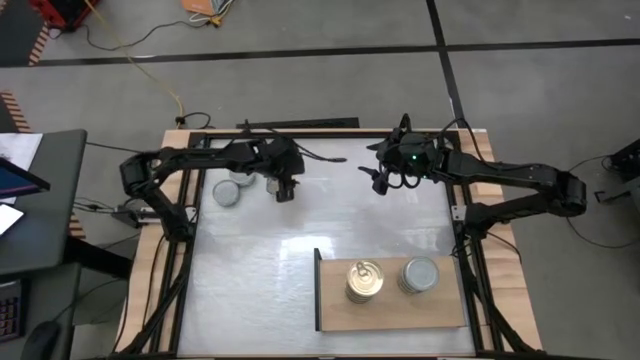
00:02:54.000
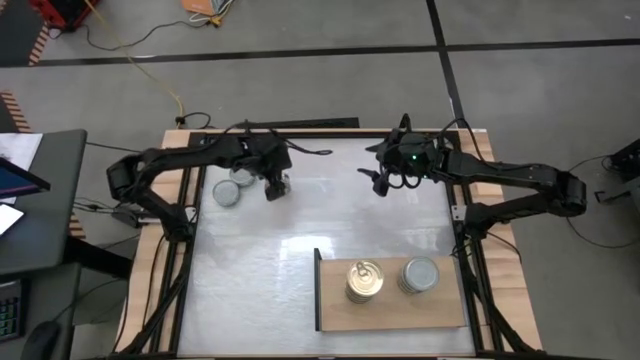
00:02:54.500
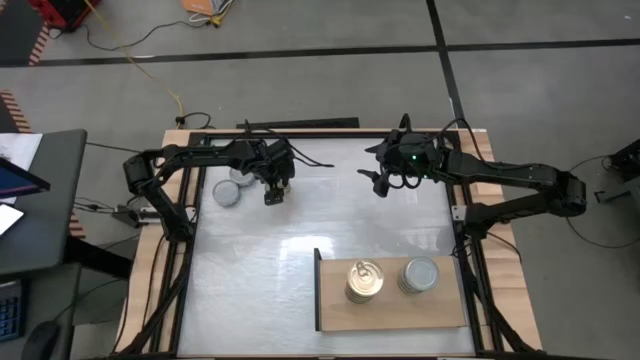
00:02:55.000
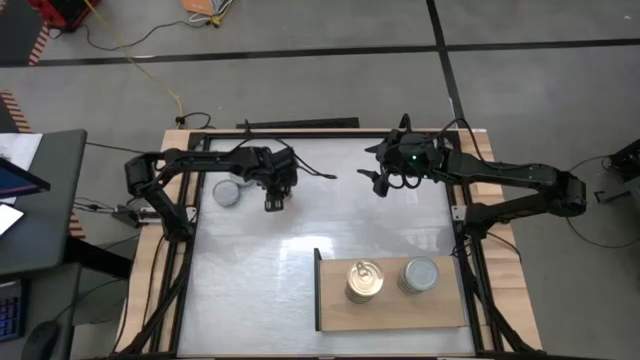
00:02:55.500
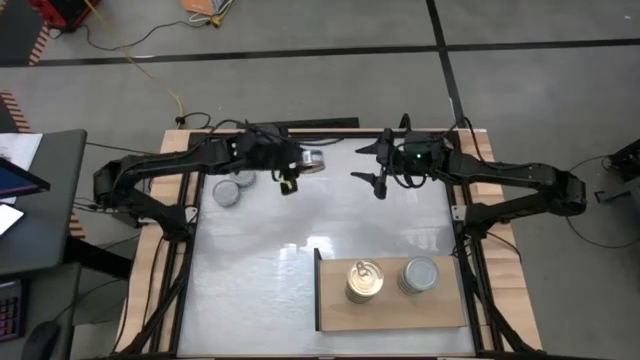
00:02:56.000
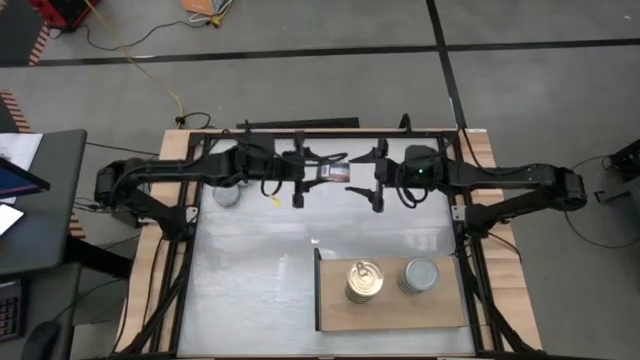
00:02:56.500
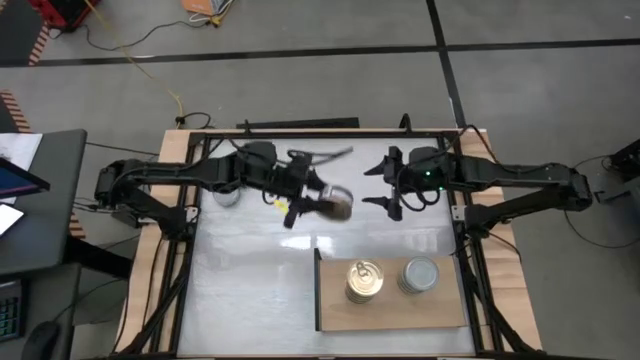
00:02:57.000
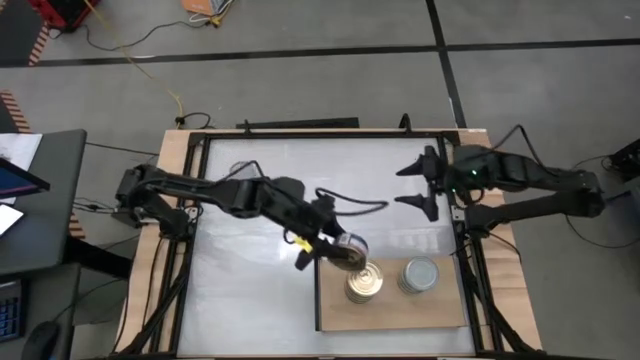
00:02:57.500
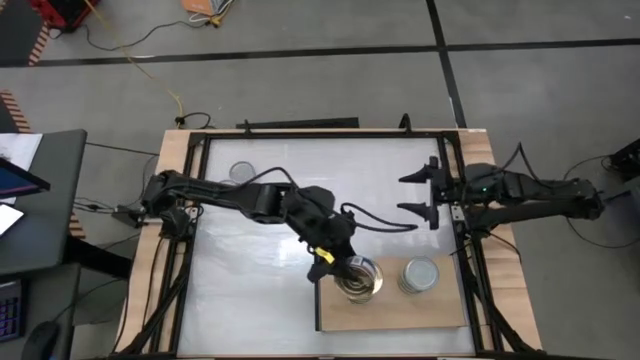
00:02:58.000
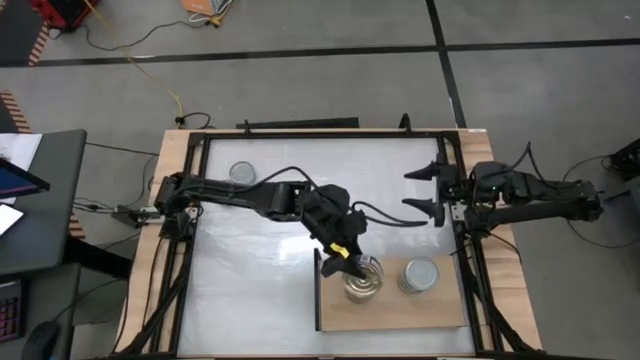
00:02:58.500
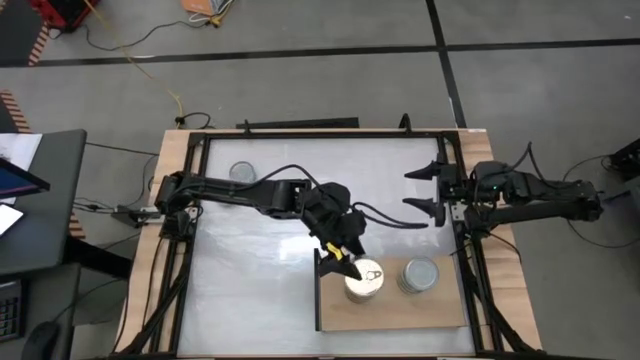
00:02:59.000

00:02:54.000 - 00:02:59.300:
Task: Stack canned seafood by type on shelf
Stack the blue pink tuna can on top of the blue pink tuna can on the shelf

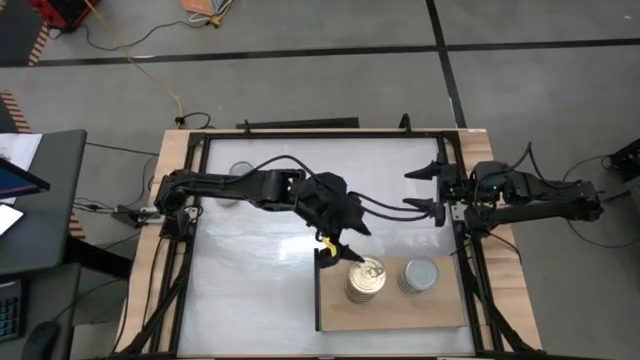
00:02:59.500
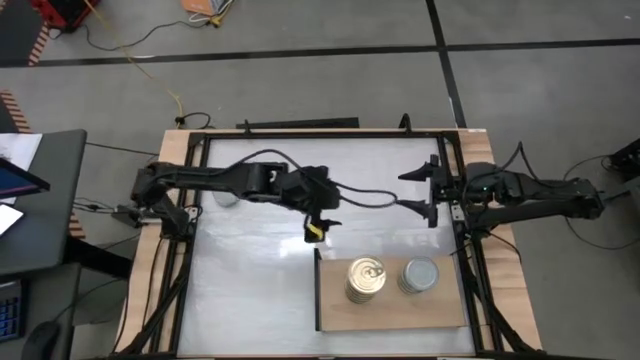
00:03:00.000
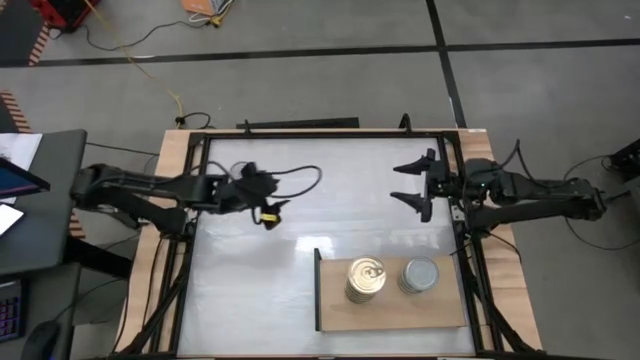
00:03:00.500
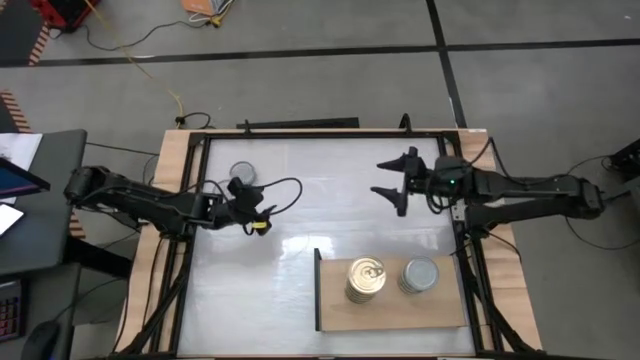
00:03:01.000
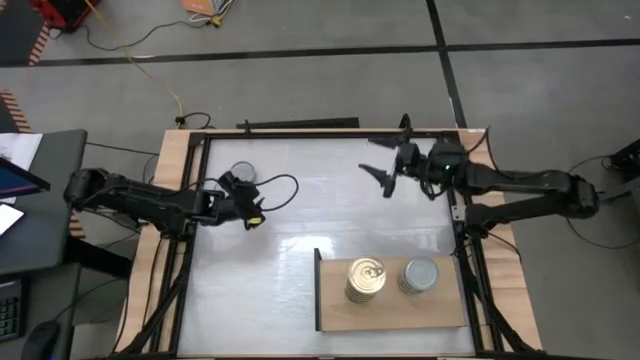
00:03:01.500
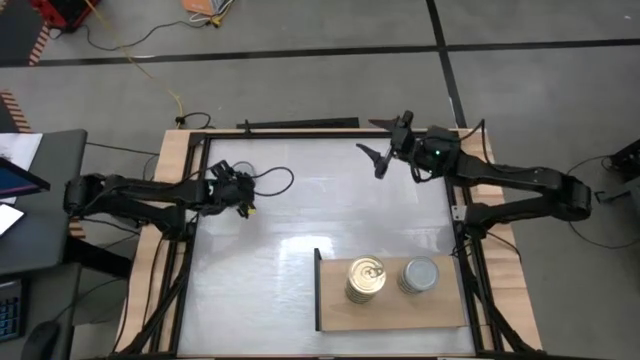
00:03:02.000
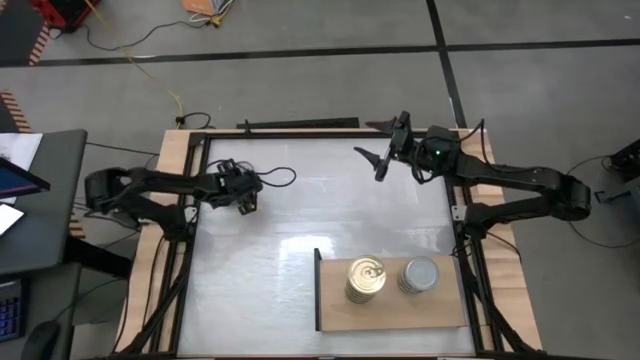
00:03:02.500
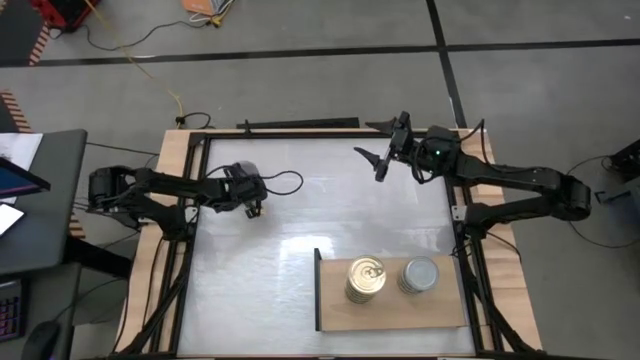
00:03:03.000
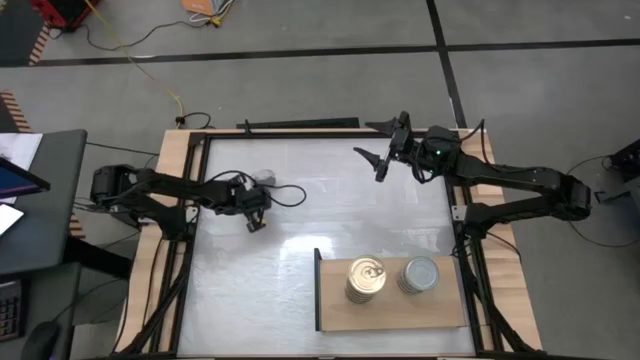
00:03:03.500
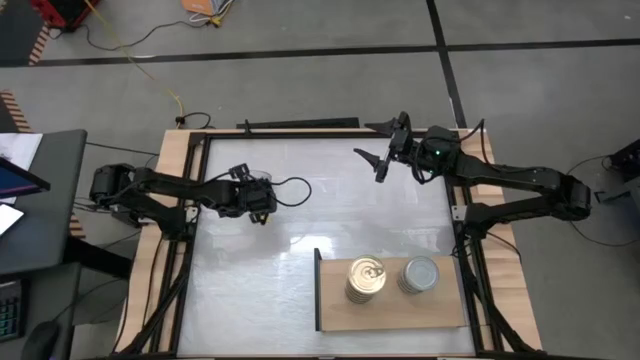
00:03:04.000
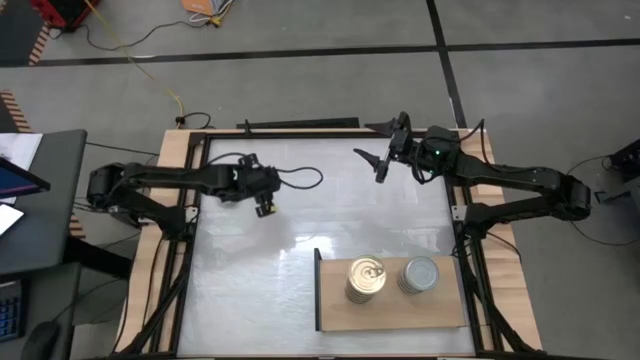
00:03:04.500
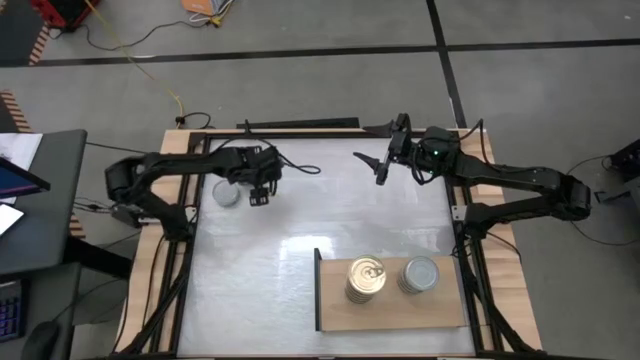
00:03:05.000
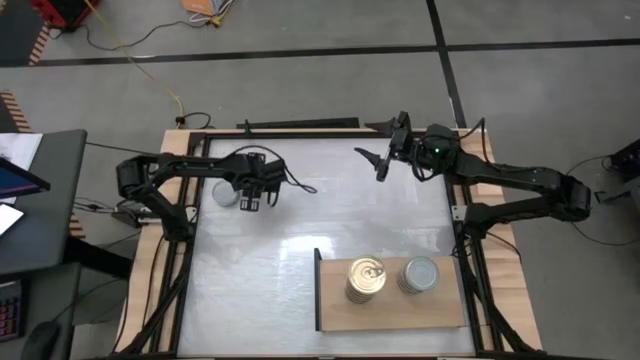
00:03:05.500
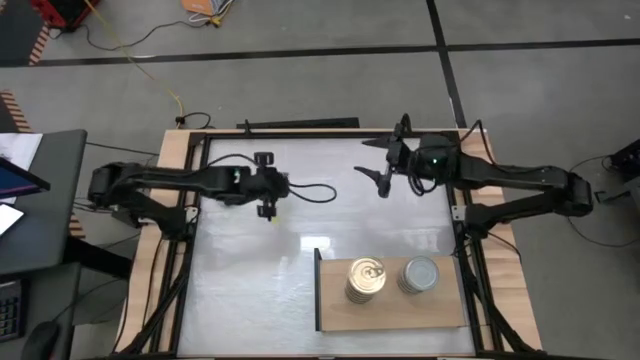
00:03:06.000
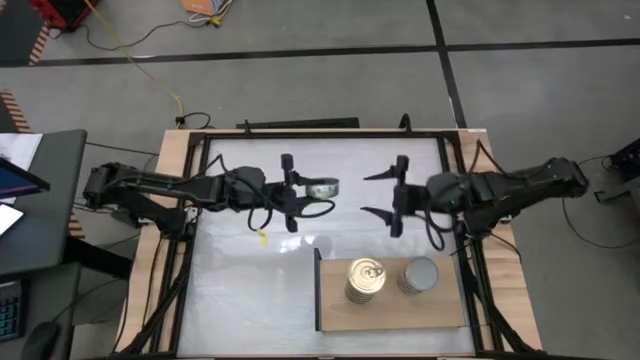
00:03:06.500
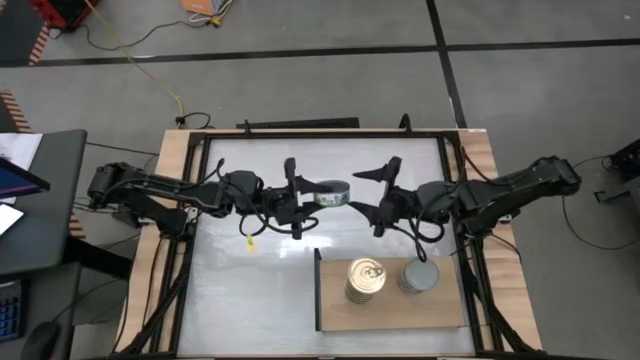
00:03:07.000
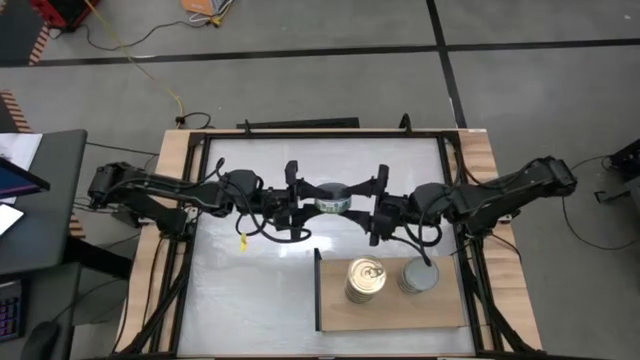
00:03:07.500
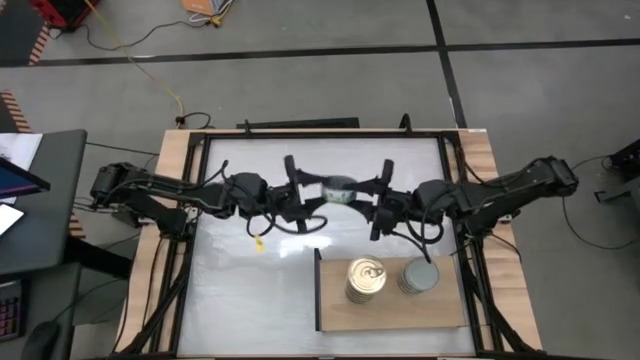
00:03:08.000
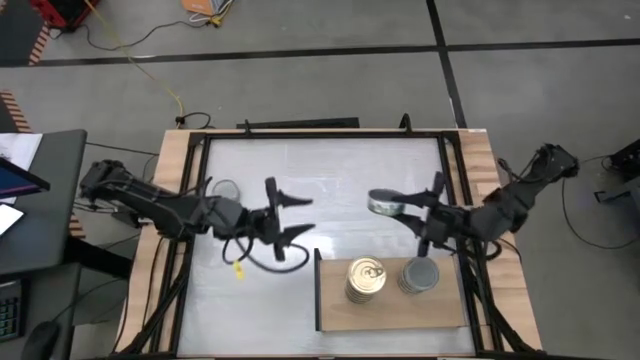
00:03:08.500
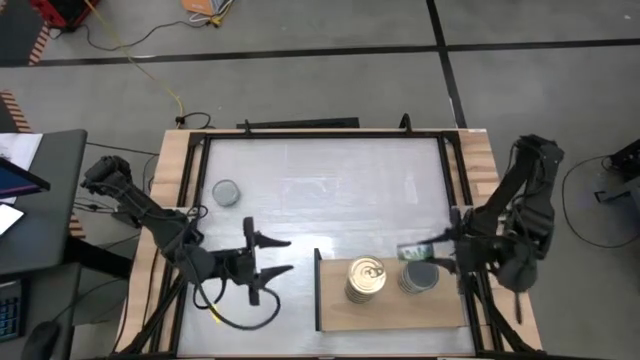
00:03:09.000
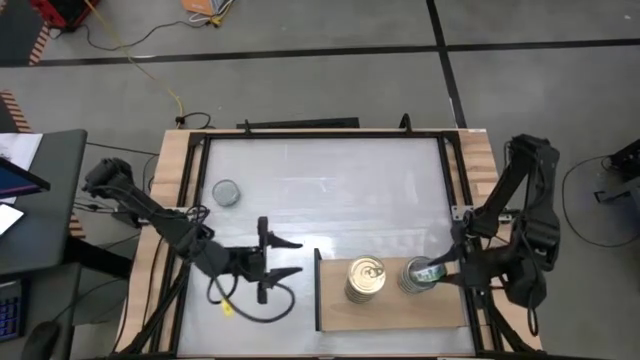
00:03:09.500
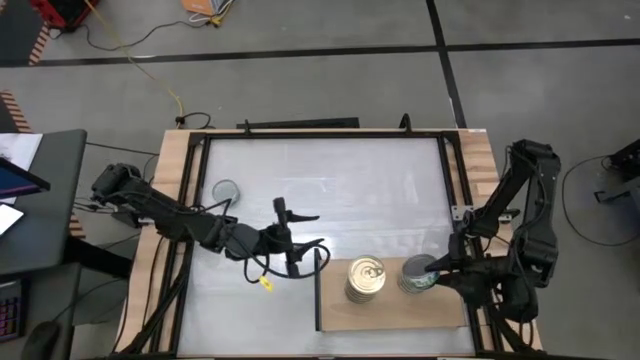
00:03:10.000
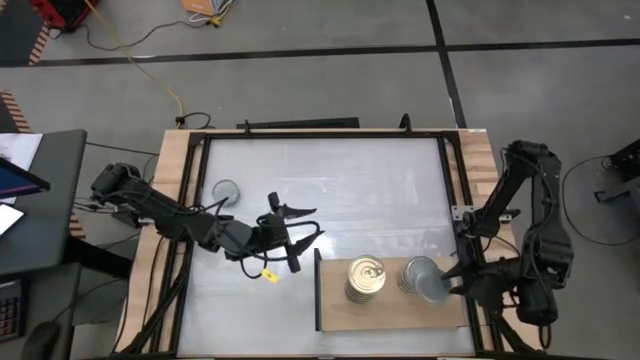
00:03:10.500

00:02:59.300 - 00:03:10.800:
Stack the green tuna can on top of the green tuna can on the shelf

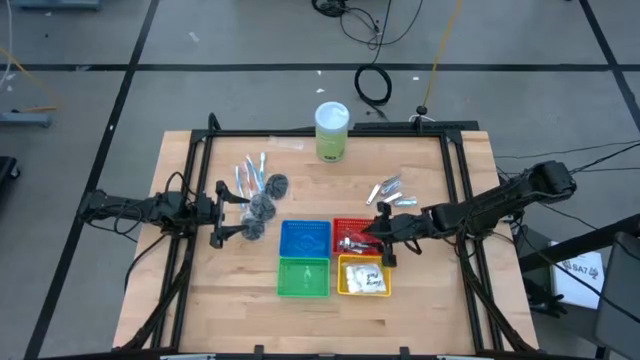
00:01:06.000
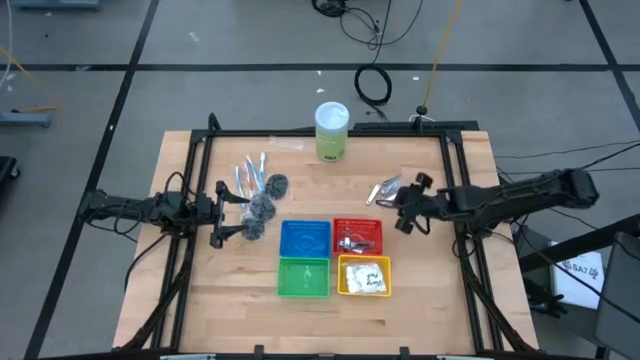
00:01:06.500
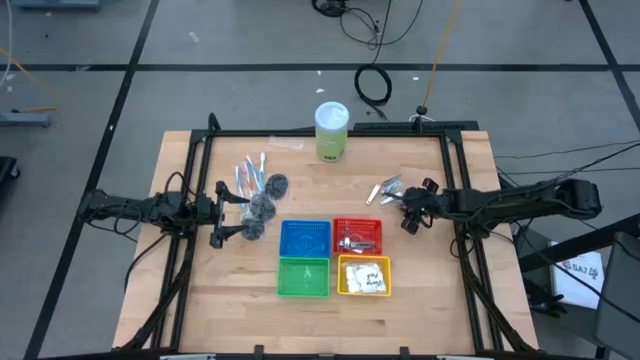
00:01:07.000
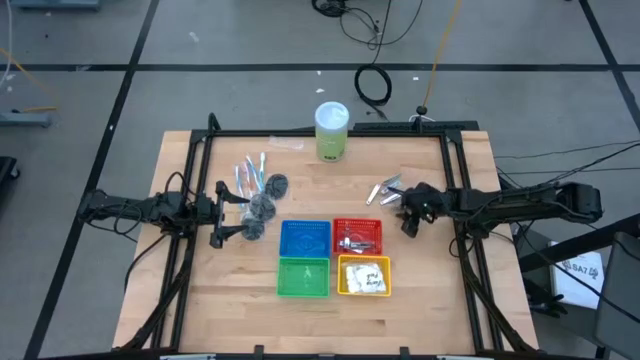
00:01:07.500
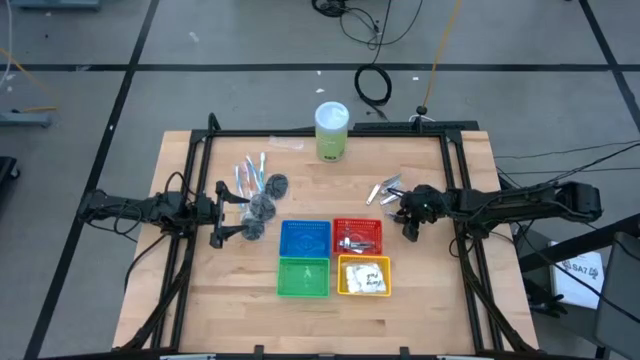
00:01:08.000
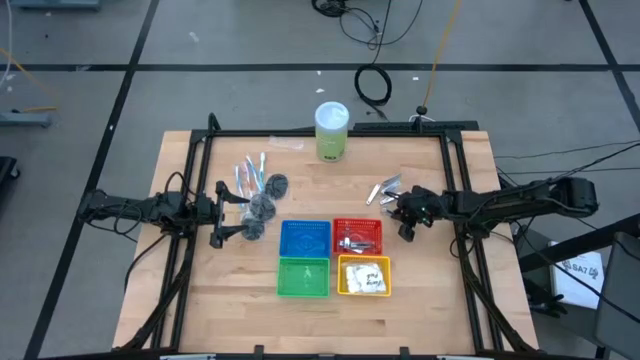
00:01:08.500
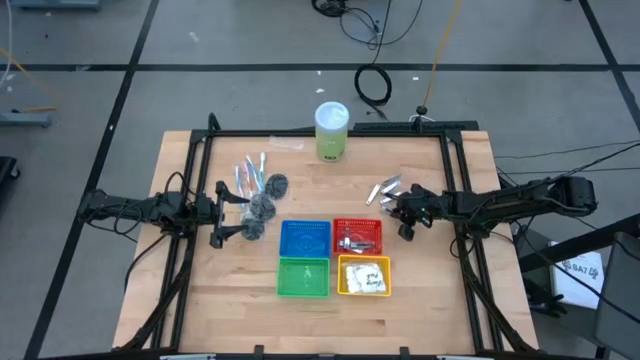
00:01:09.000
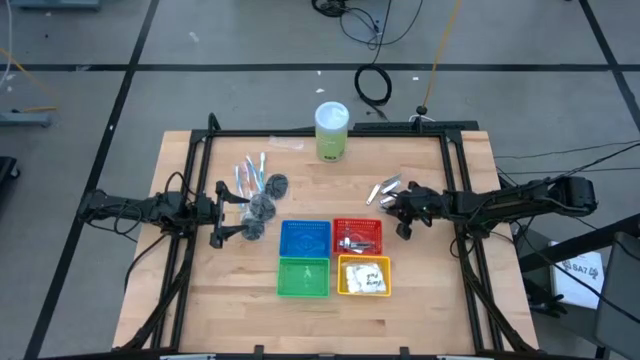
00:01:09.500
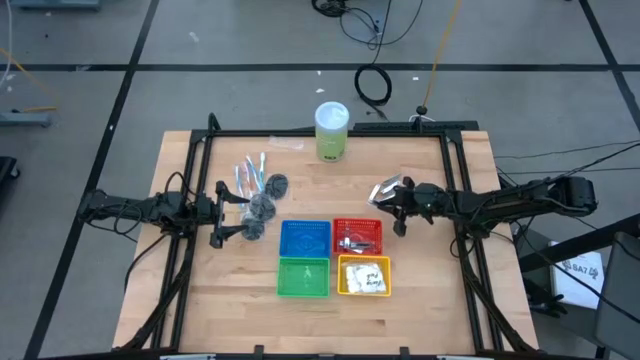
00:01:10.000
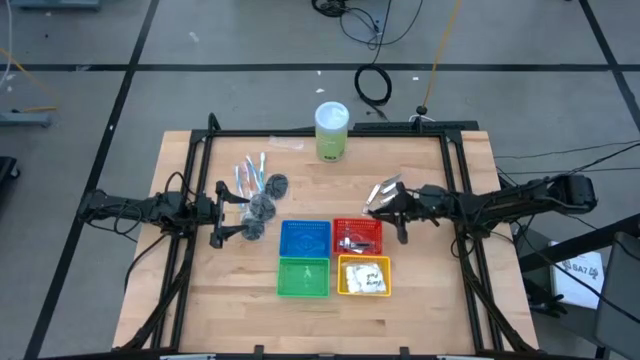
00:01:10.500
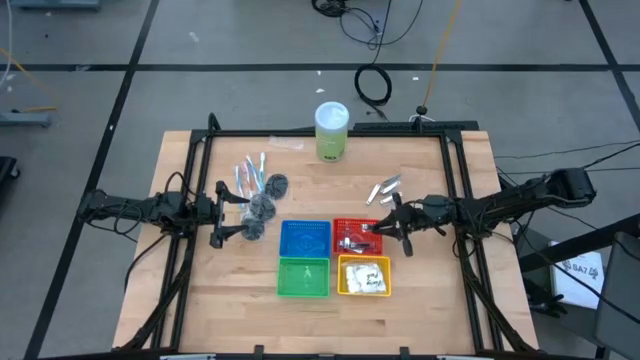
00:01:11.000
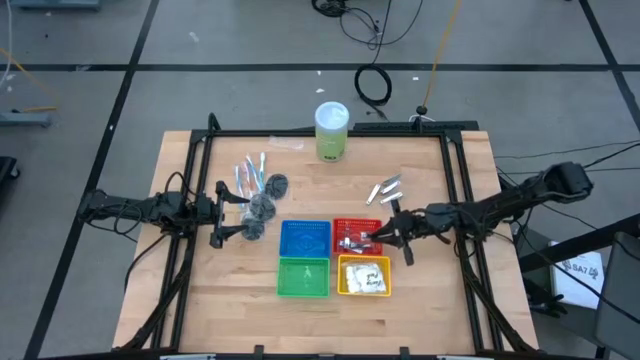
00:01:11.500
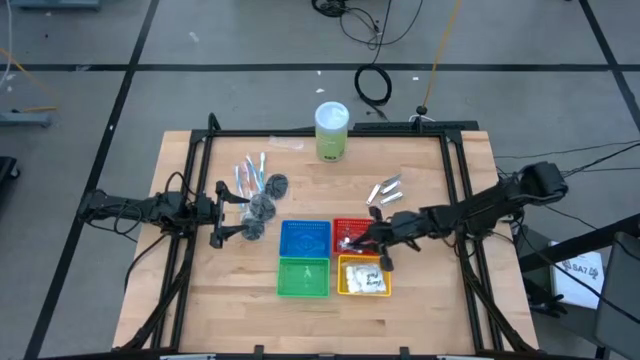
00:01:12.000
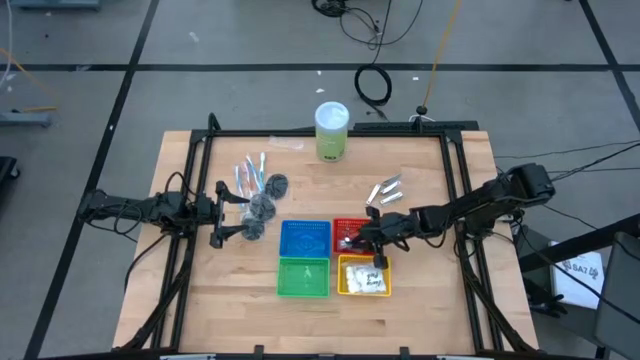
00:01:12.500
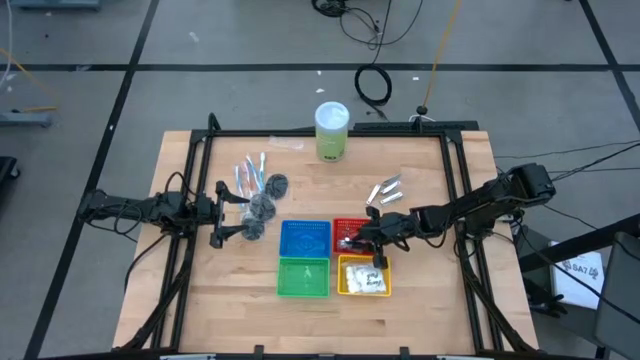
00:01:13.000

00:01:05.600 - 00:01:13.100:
Task: Pick & Place Travel size toiletries
Put the nail cutter into the red basket
